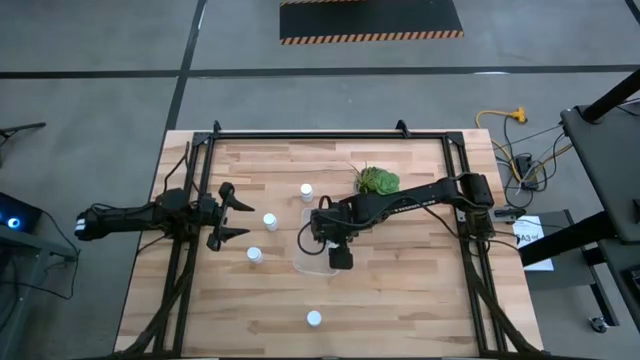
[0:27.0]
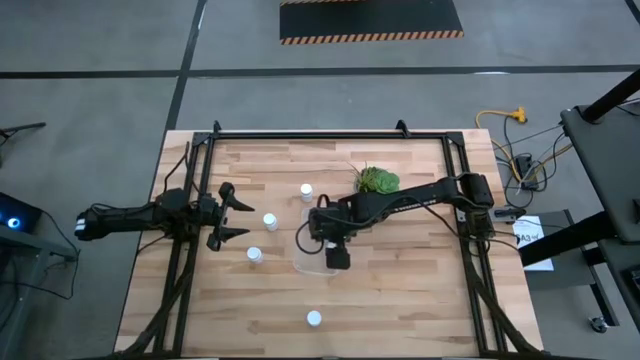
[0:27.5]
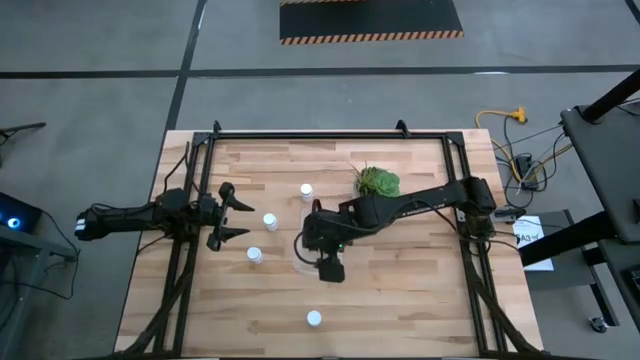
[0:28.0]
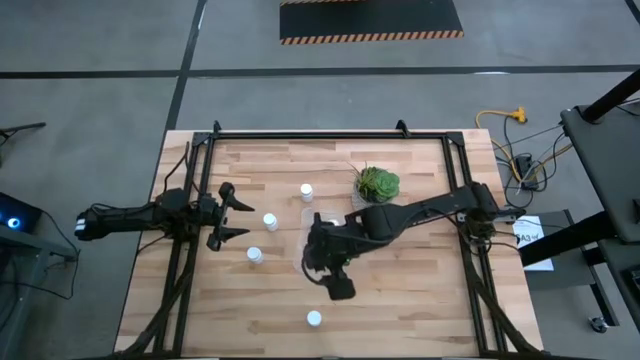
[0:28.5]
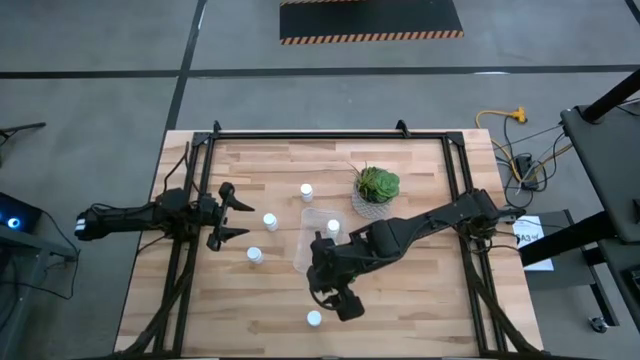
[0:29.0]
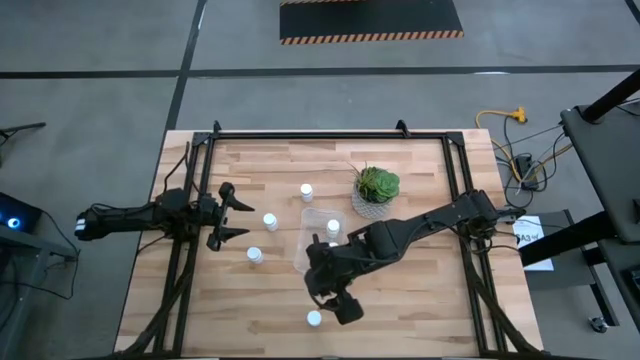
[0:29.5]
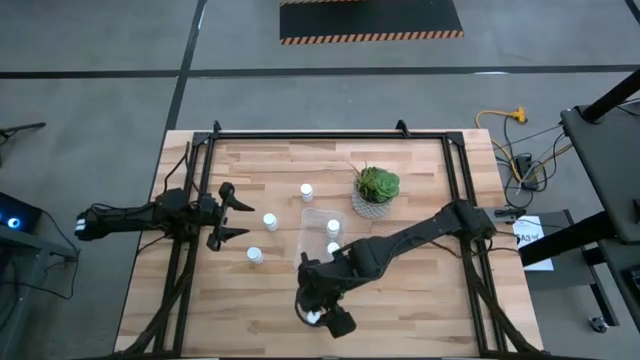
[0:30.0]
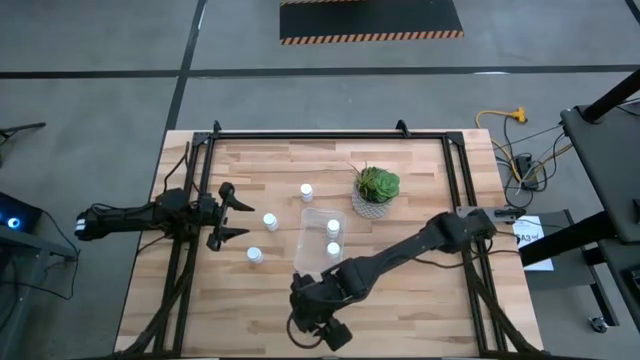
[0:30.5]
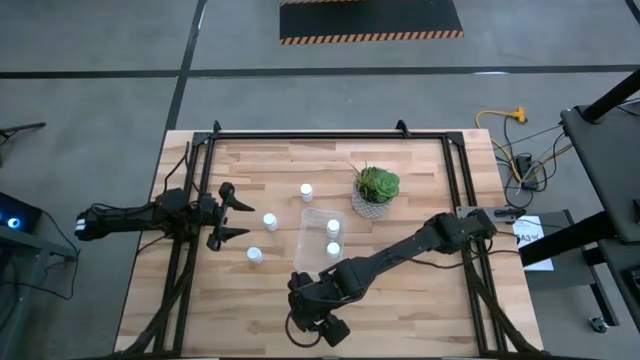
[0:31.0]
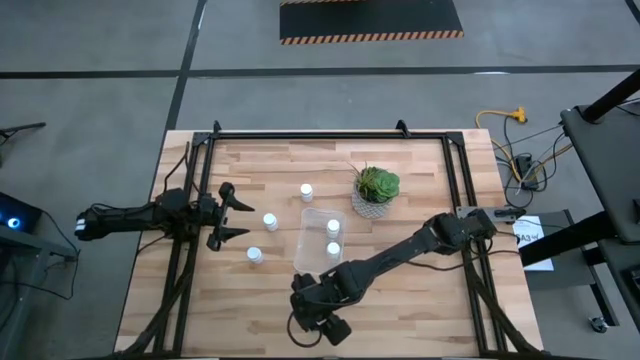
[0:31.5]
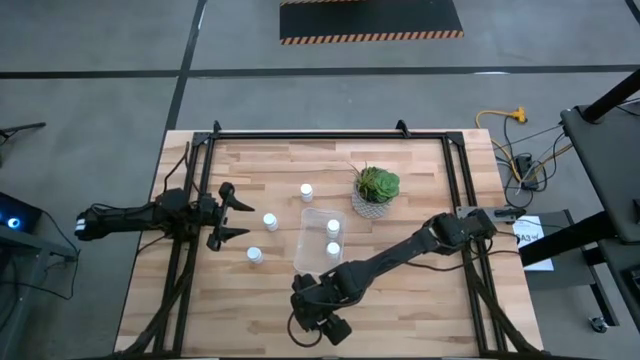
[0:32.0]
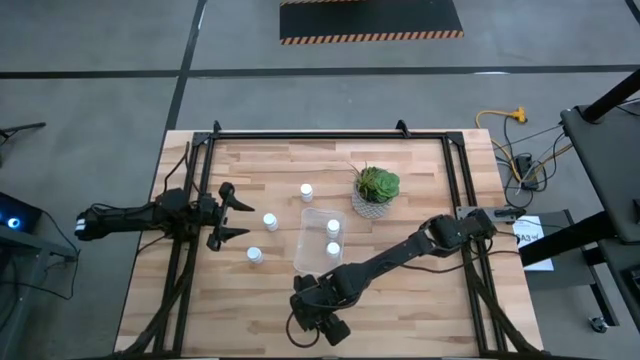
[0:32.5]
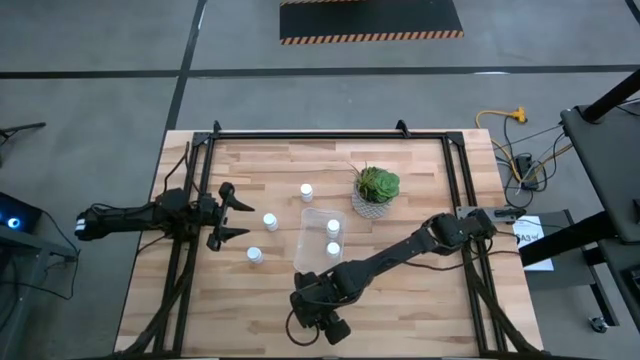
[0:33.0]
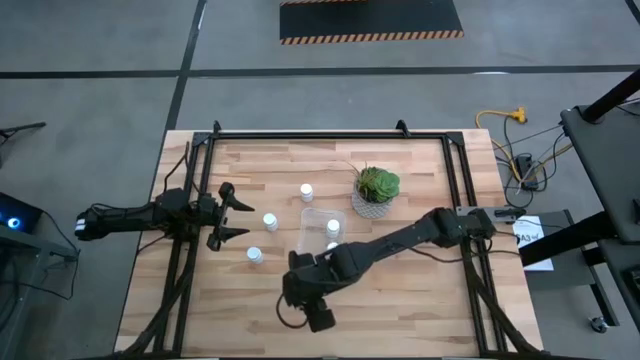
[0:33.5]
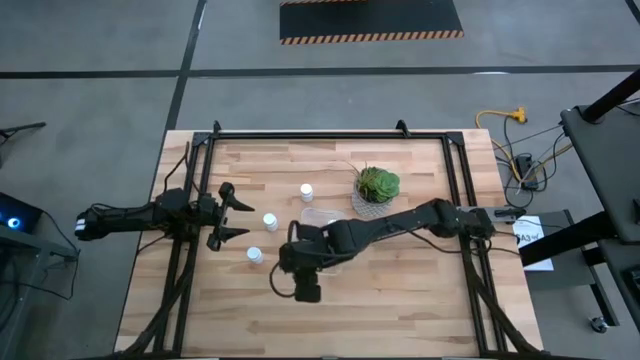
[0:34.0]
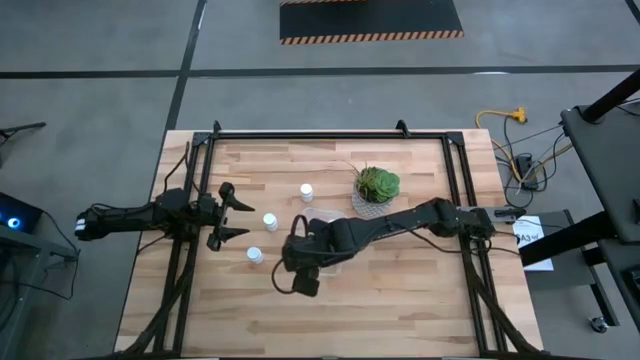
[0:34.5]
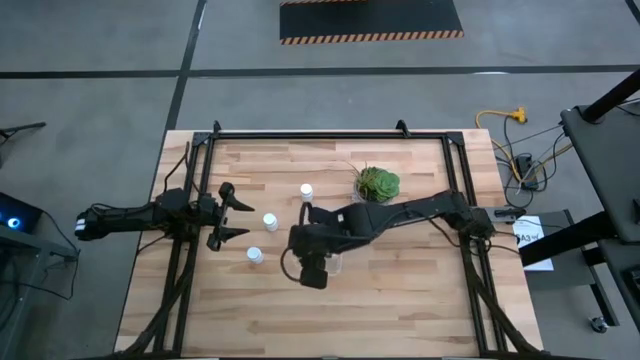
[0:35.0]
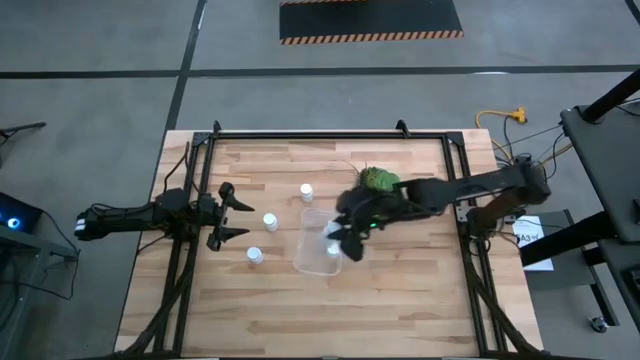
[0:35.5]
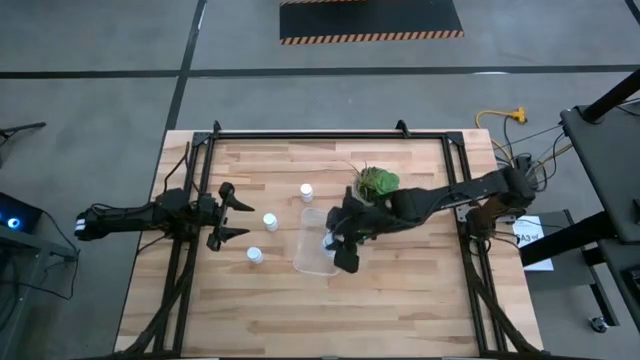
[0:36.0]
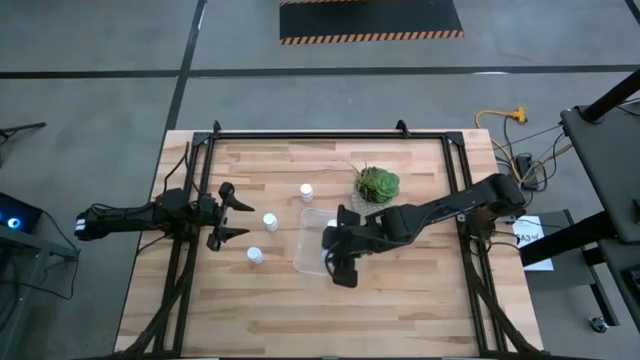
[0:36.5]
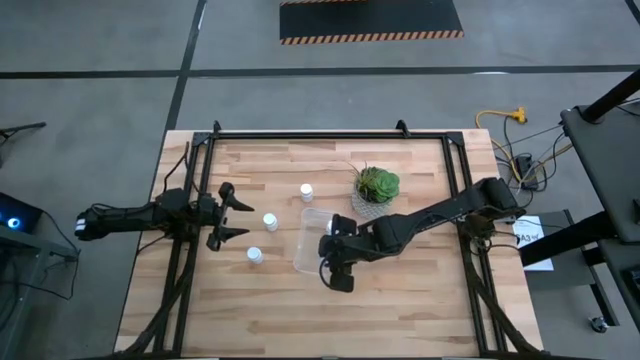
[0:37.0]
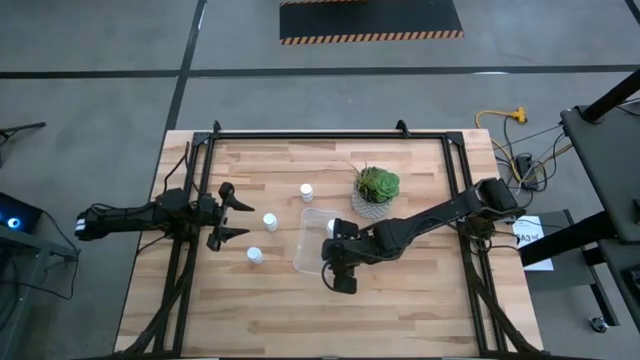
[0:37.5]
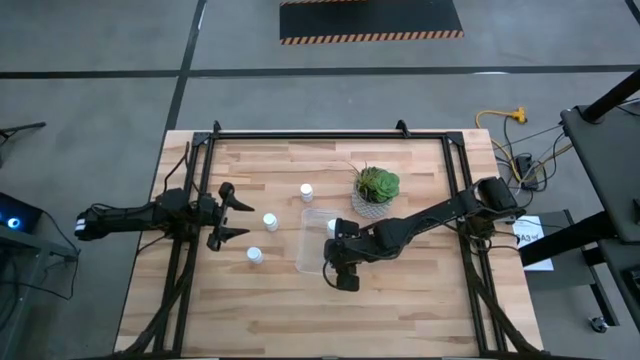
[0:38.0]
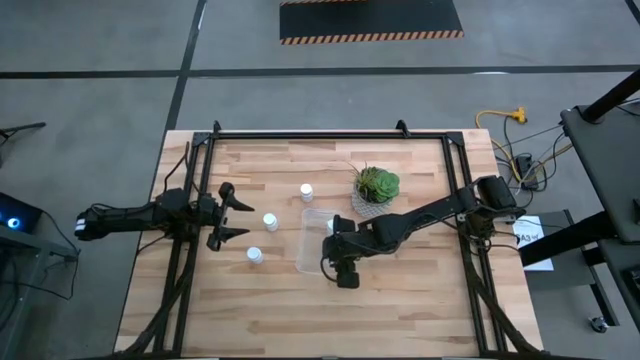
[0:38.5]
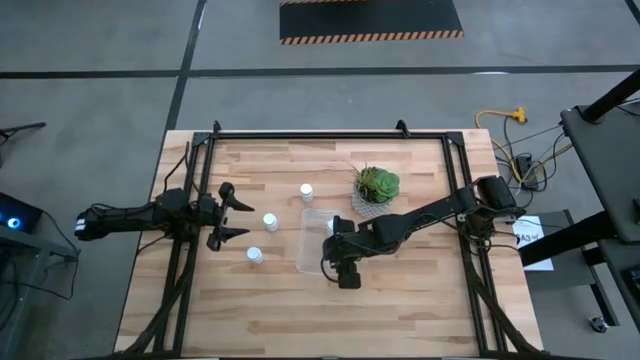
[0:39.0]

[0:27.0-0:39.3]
Task: Pick and place pill bottles into a basket
Put the white medicine bottle into the transparent bin

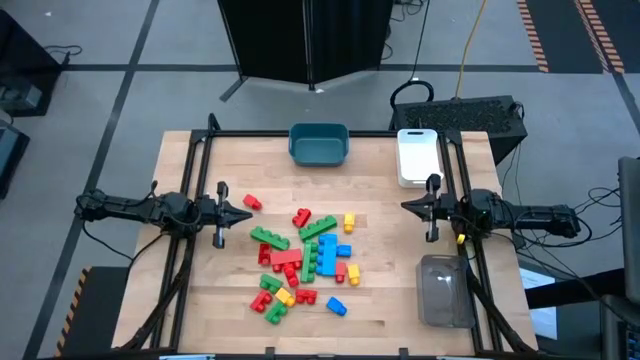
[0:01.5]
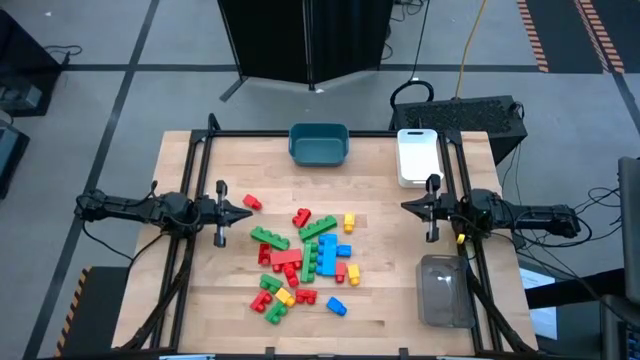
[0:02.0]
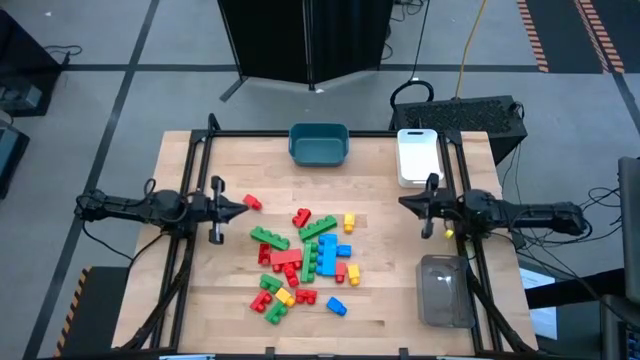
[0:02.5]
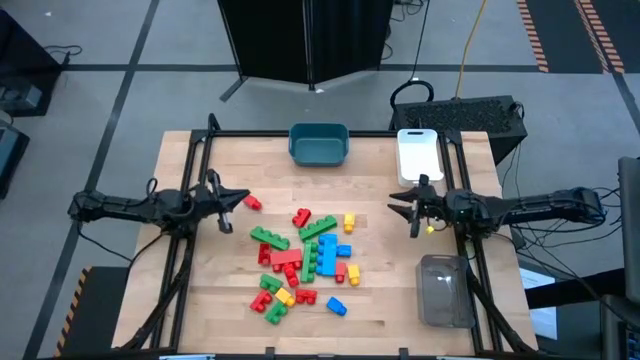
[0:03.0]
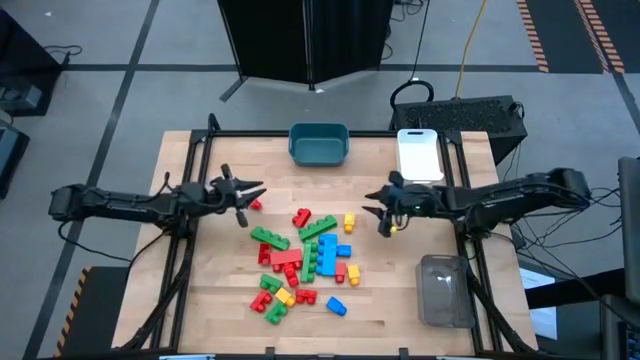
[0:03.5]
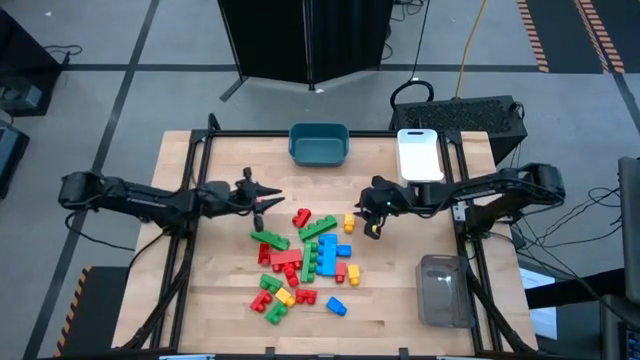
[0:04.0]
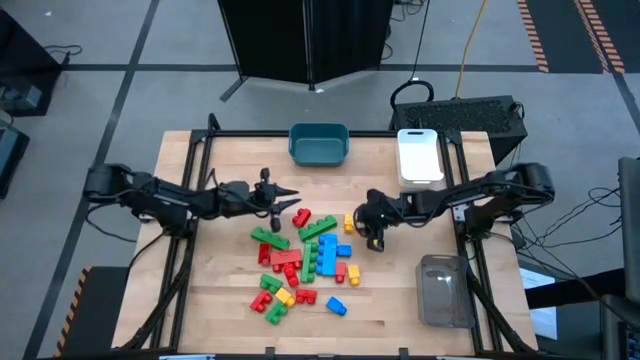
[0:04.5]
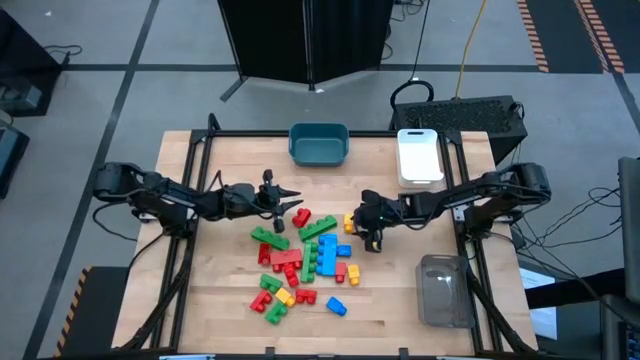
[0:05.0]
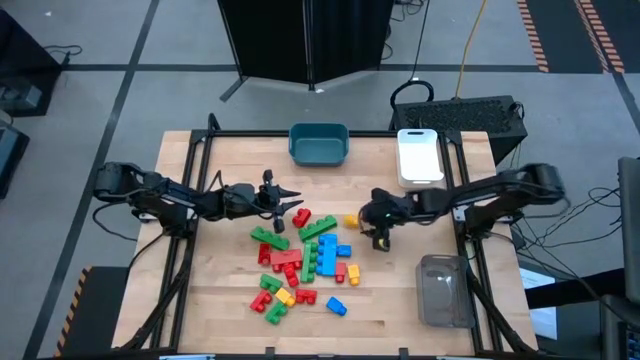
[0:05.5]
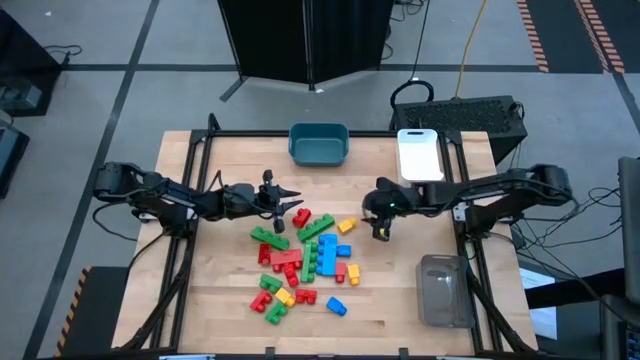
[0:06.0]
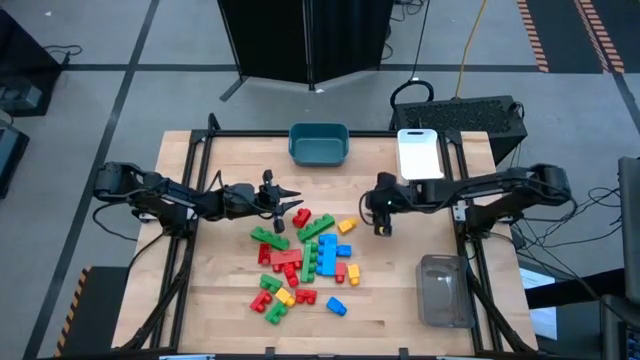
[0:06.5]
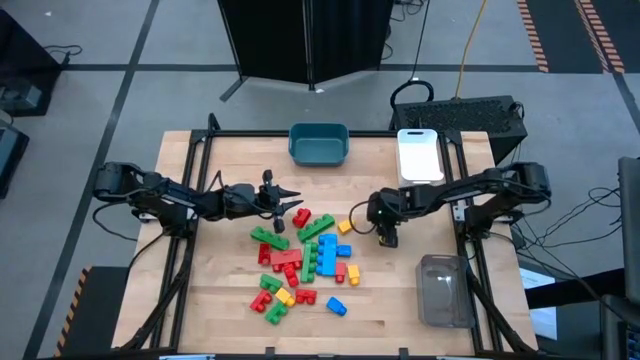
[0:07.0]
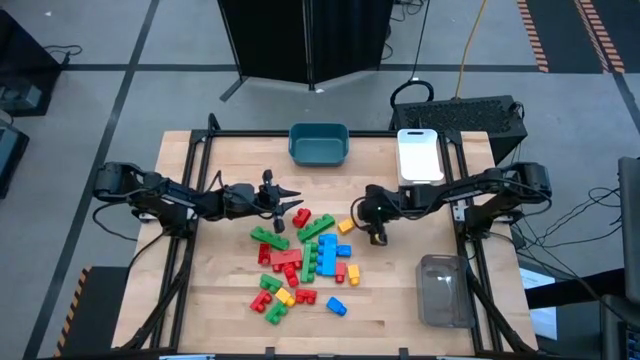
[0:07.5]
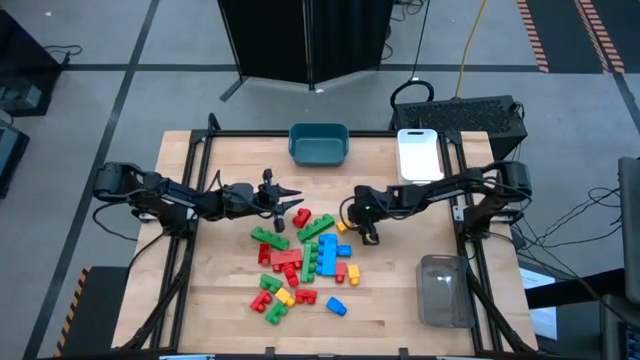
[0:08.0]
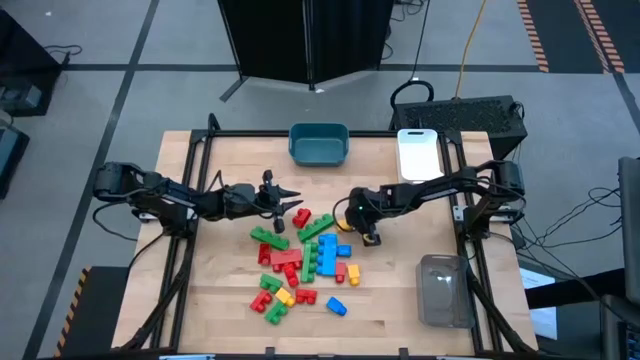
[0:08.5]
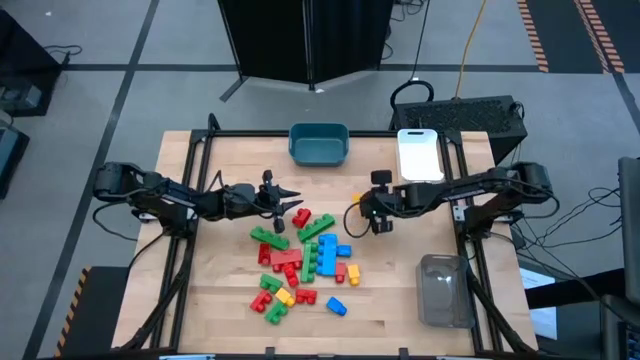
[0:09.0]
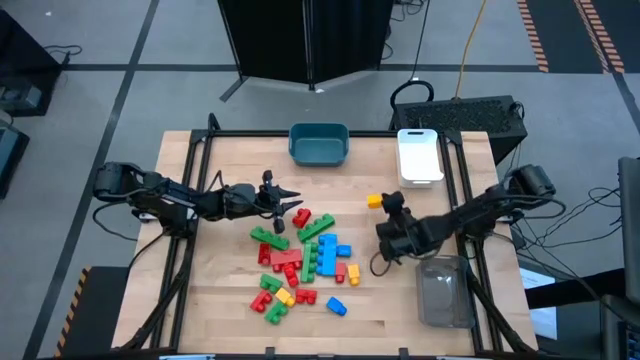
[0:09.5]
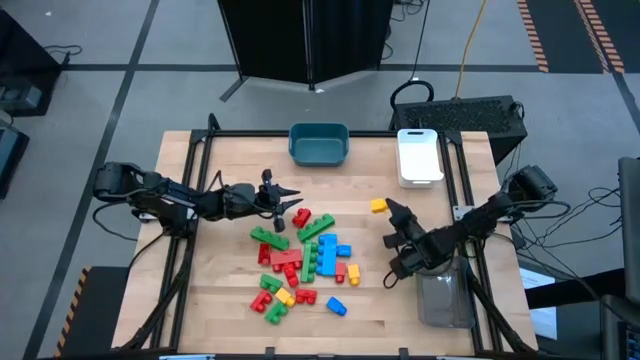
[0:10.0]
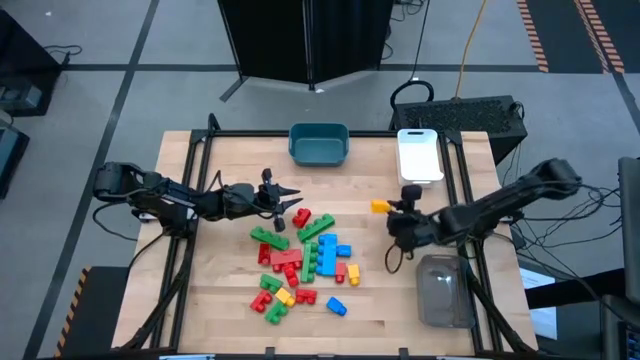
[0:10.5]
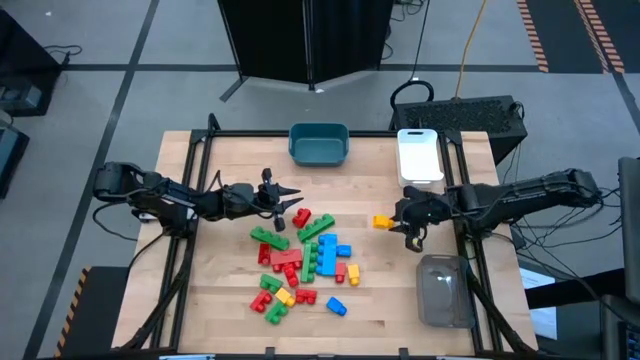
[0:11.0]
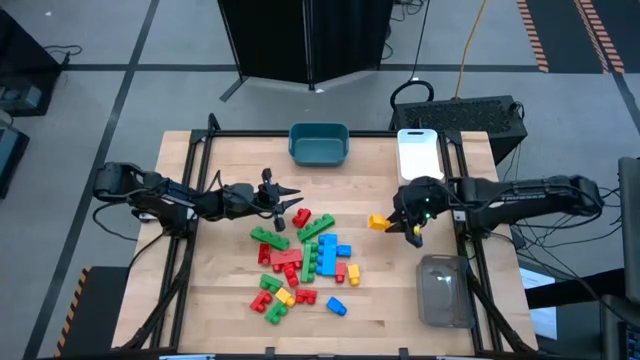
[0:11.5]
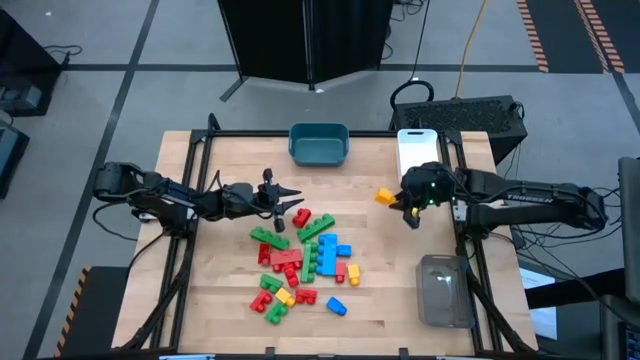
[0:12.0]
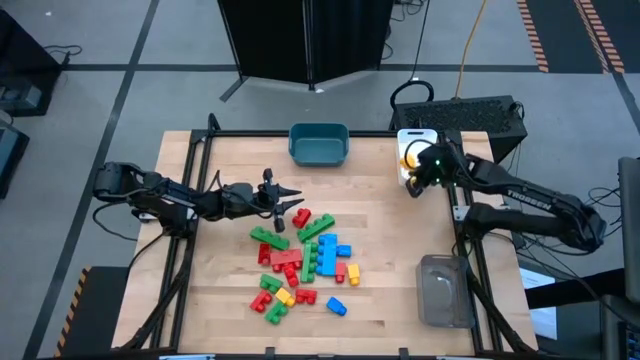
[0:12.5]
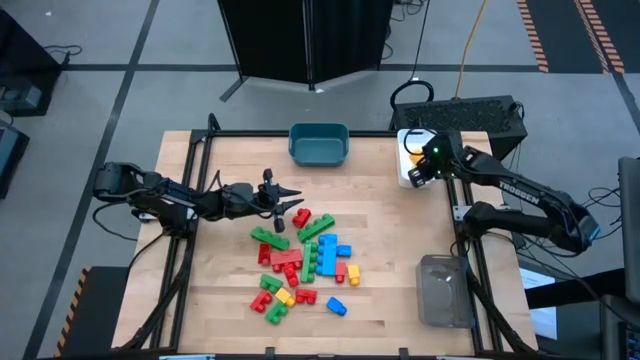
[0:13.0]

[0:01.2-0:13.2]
Task: Sort blocks by size
Put the one stud yellow game piece into the white bin
